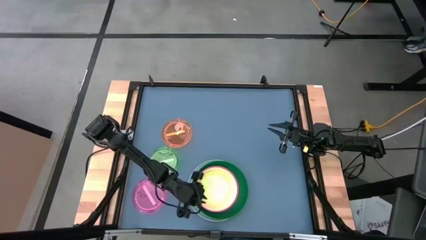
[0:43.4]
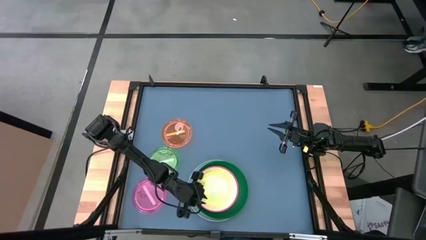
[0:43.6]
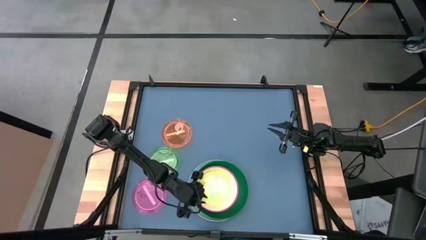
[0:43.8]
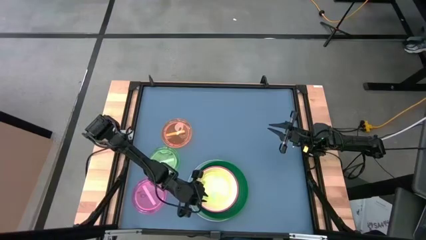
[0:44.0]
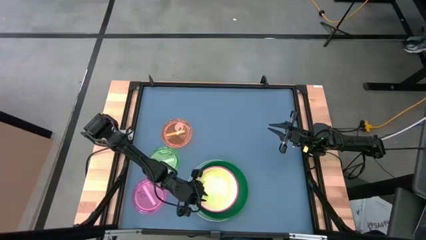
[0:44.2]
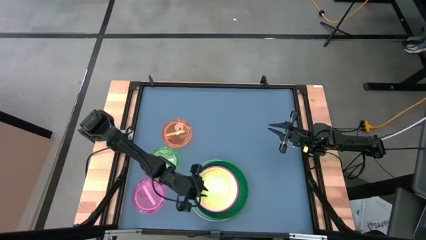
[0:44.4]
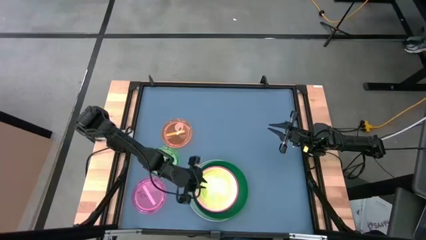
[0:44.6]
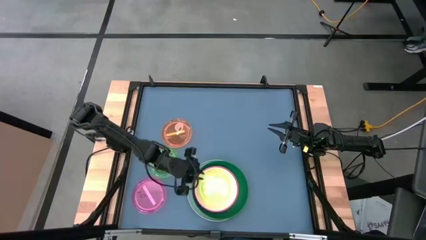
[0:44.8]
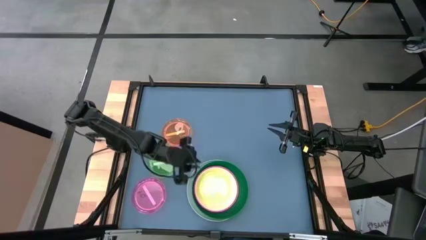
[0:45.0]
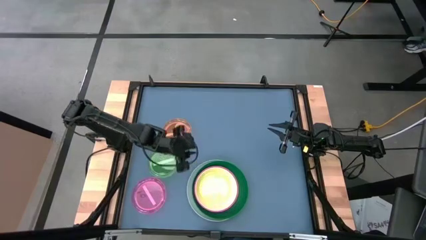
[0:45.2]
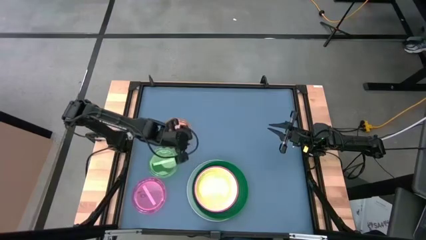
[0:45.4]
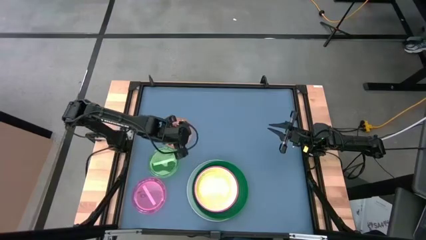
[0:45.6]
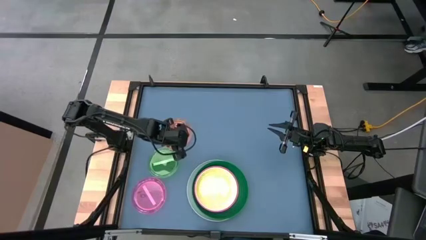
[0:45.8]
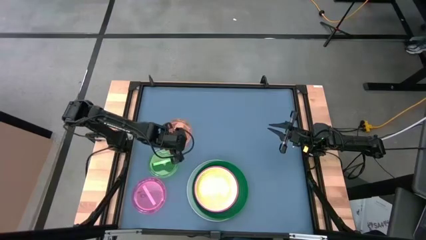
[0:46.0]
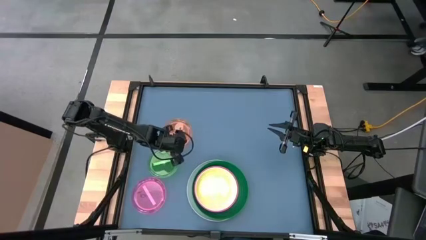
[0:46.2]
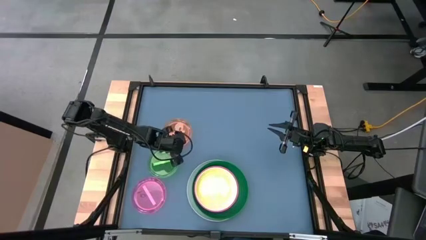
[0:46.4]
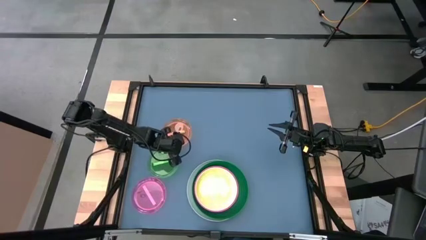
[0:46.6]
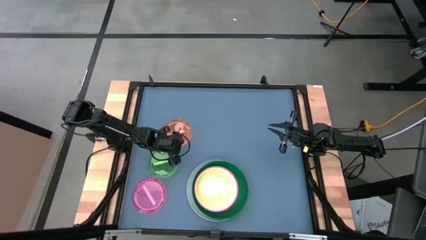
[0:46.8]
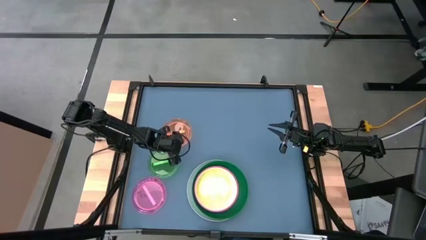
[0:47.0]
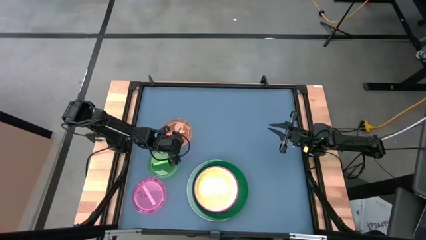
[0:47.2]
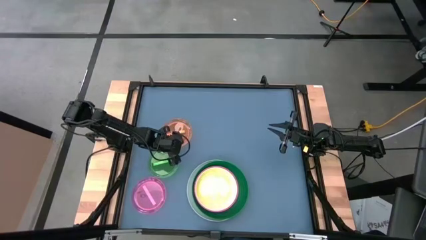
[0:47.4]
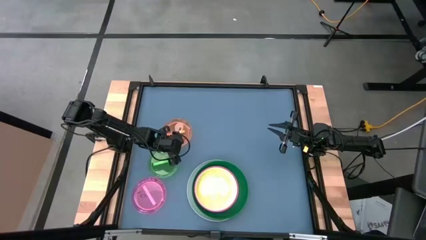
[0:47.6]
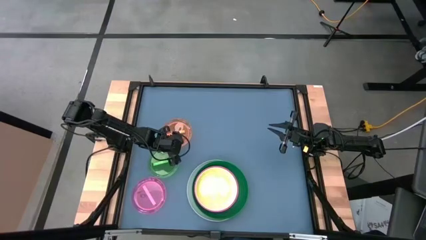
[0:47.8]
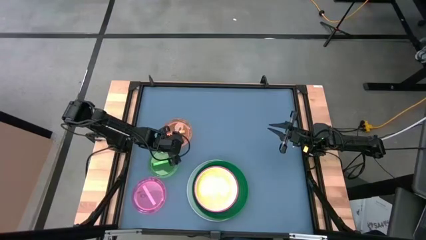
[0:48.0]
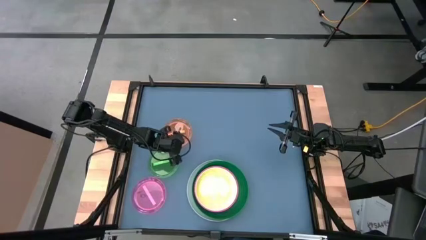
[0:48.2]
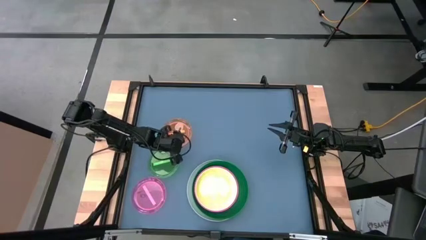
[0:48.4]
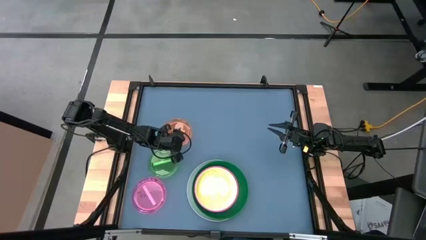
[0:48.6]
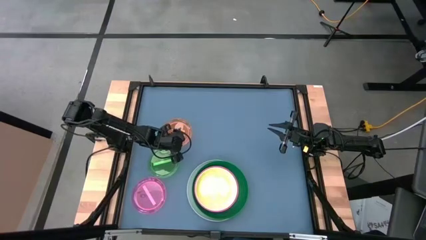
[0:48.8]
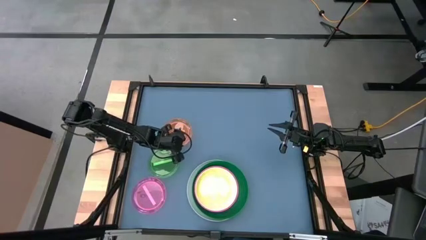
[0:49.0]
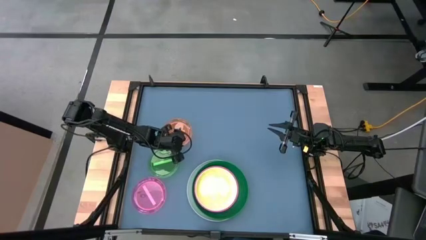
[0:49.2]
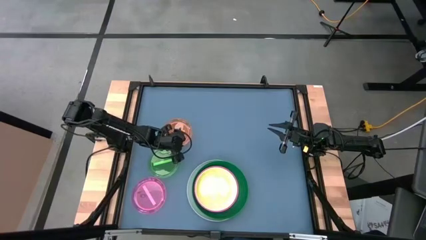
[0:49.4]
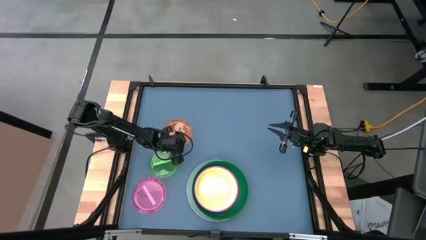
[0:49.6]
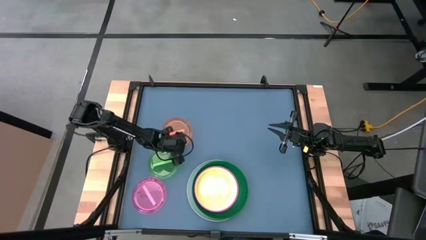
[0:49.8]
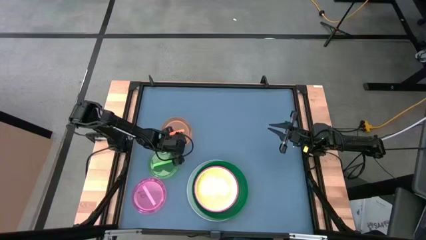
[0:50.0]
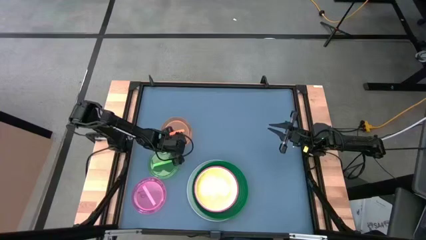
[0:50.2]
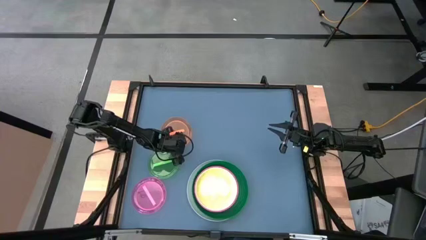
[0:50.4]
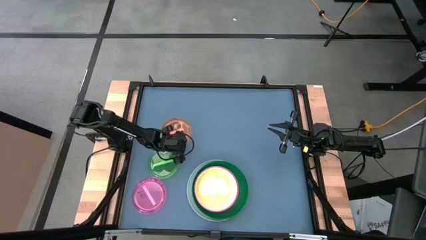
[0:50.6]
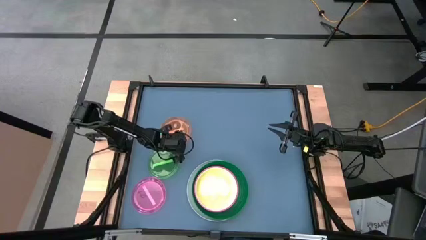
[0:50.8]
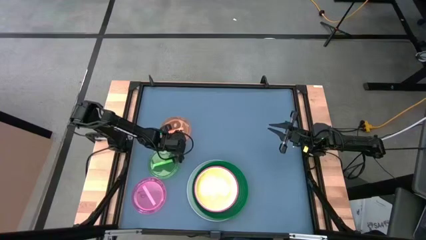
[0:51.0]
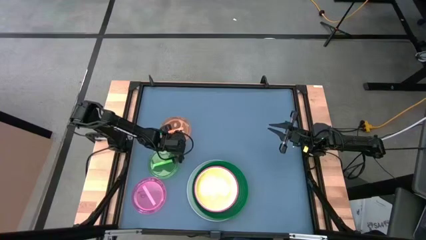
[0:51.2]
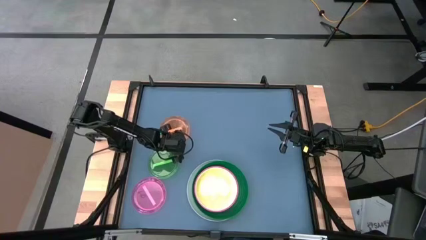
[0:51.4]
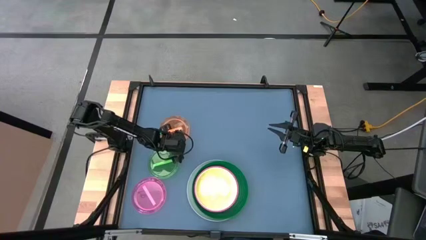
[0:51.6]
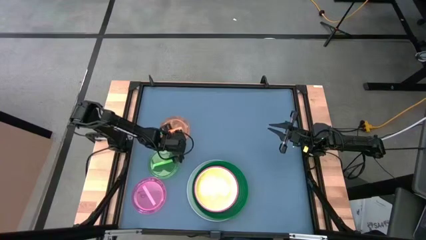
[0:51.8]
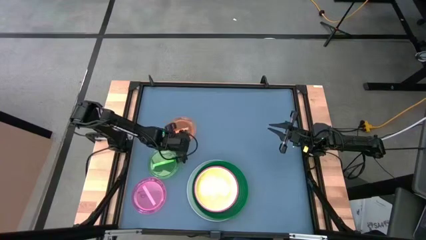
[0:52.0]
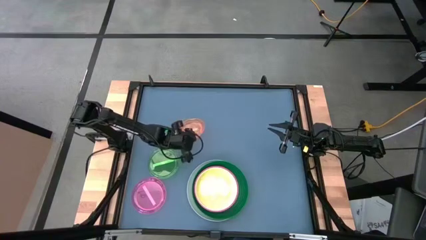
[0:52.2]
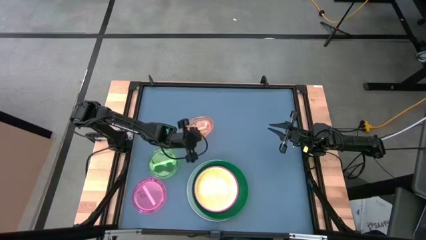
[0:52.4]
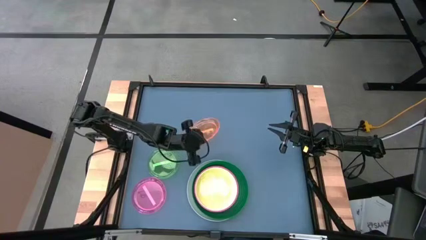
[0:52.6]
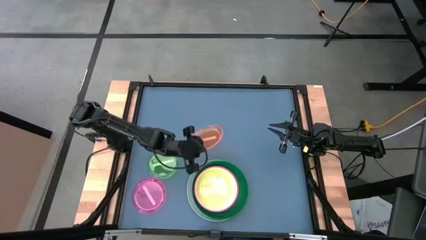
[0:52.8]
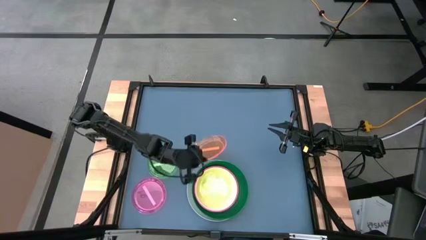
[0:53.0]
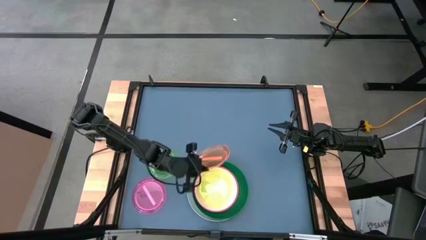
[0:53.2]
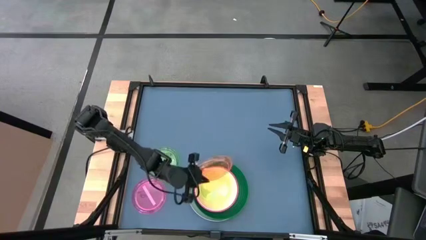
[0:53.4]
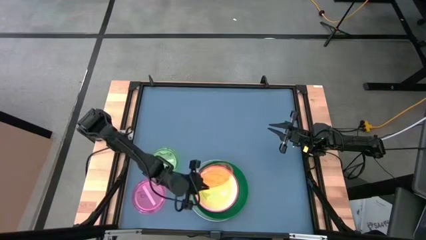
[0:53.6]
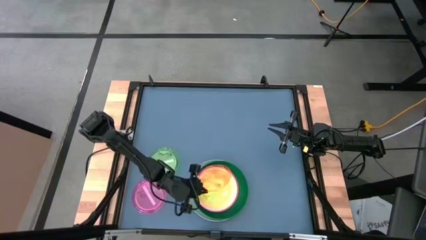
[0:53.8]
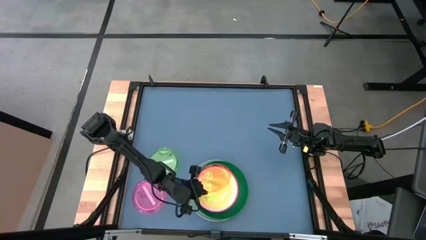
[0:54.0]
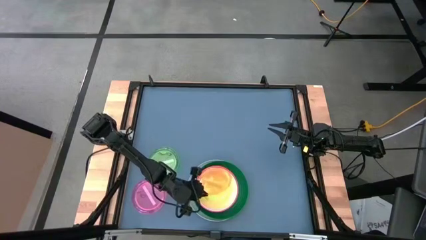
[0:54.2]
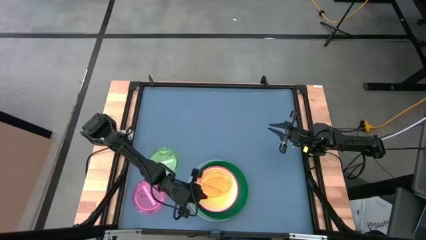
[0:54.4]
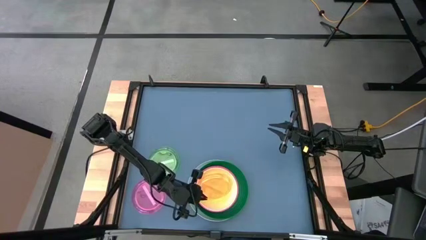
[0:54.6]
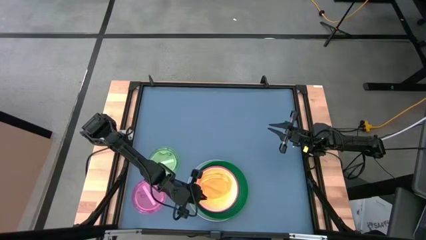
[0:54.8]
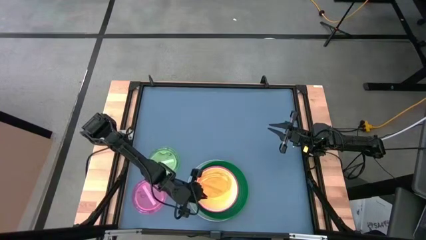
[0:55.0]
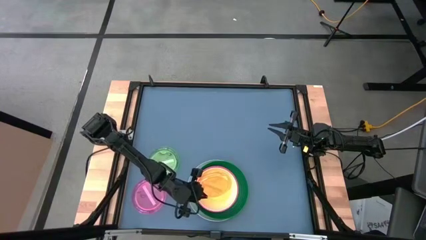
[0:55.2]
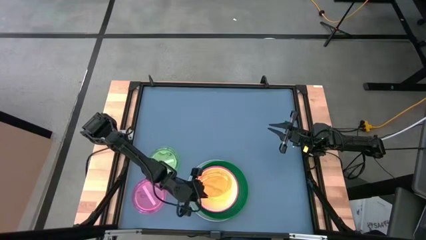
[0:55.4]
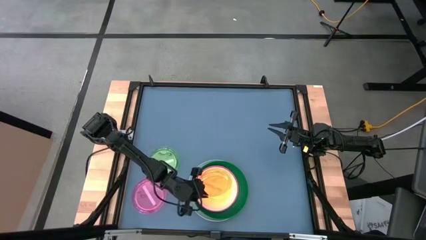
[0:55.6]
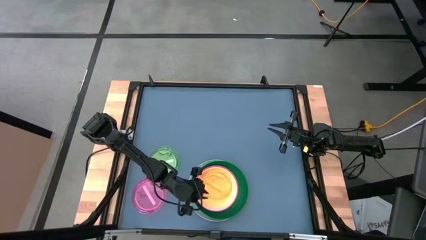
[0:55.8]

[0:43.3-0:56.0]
Task: Stack plastic plates
Stack the orange plate on the green plate
